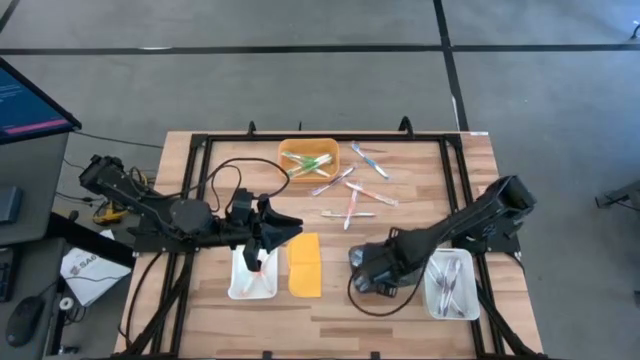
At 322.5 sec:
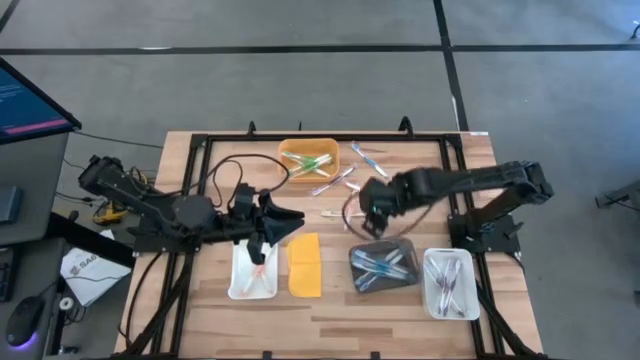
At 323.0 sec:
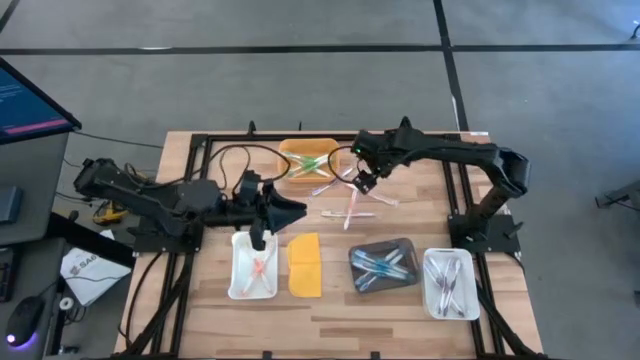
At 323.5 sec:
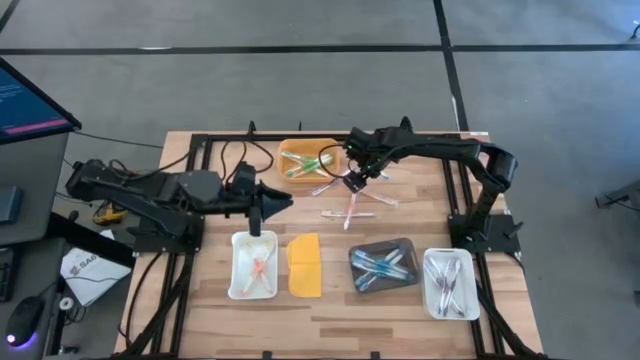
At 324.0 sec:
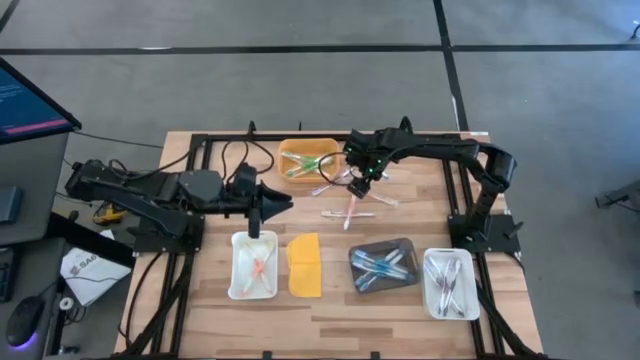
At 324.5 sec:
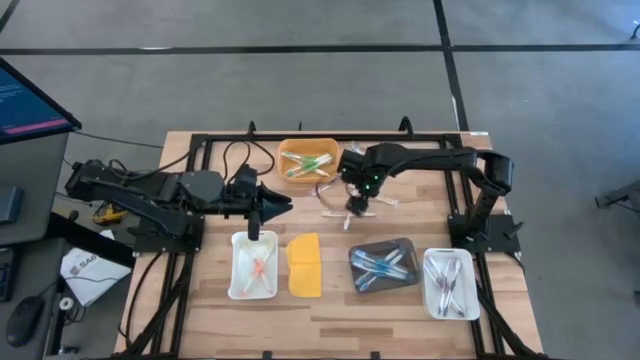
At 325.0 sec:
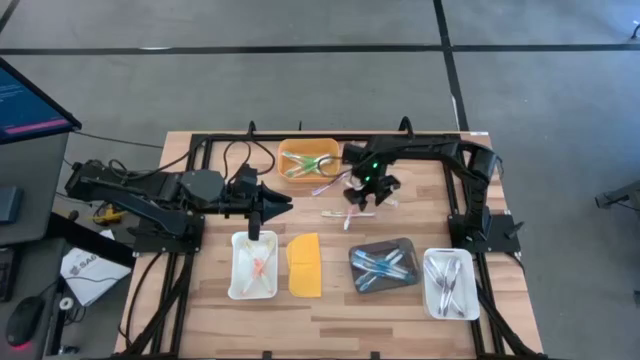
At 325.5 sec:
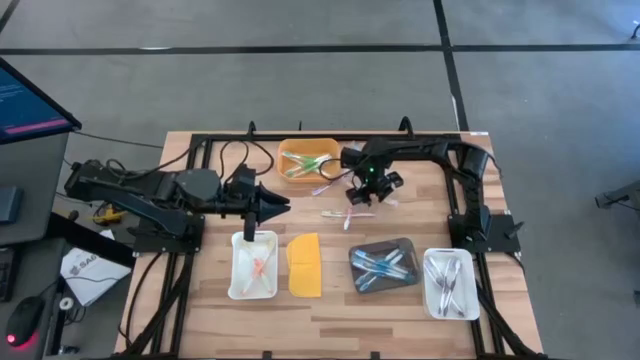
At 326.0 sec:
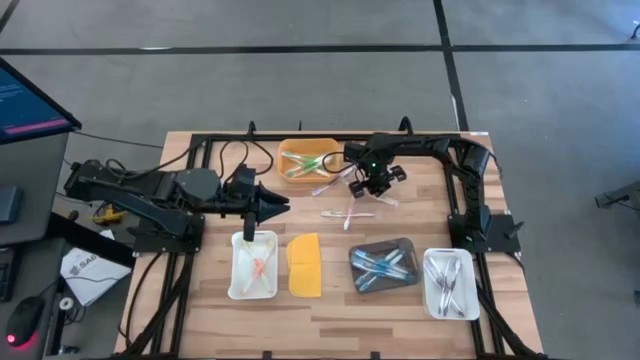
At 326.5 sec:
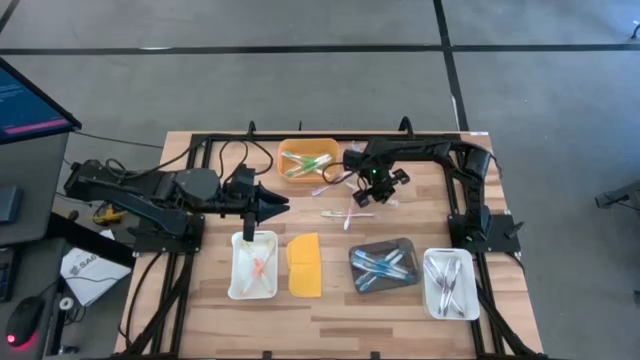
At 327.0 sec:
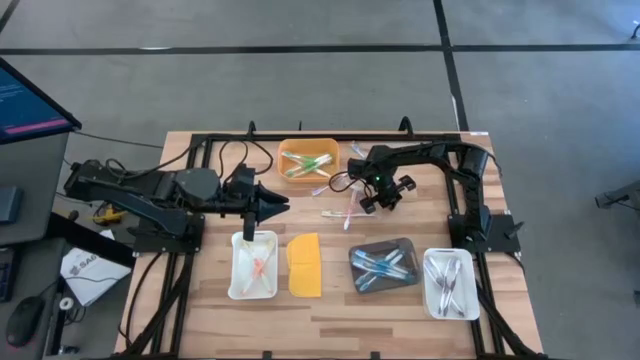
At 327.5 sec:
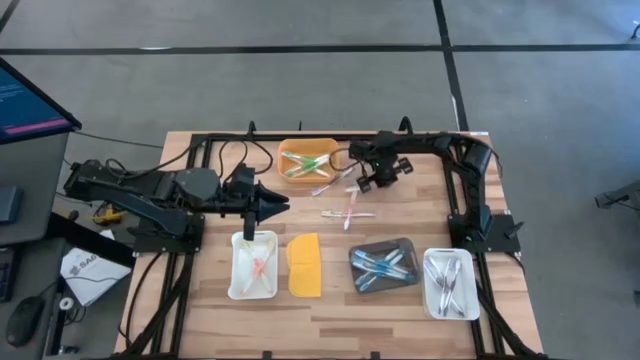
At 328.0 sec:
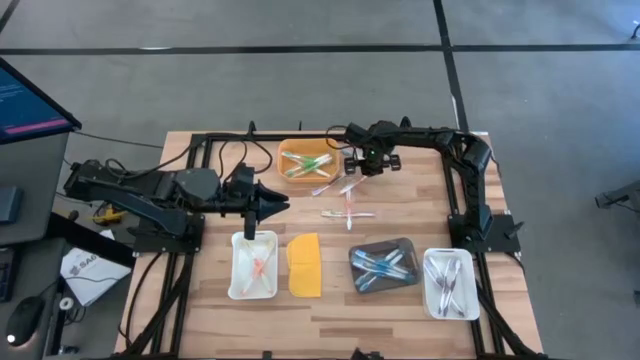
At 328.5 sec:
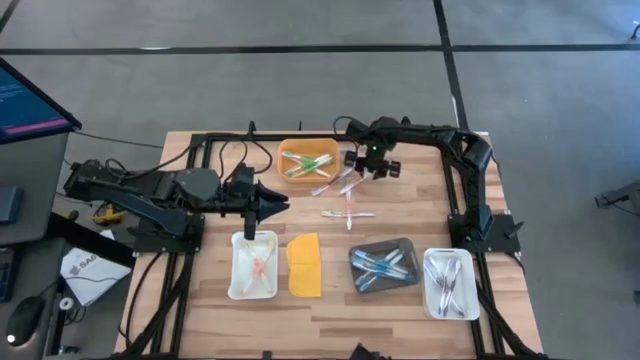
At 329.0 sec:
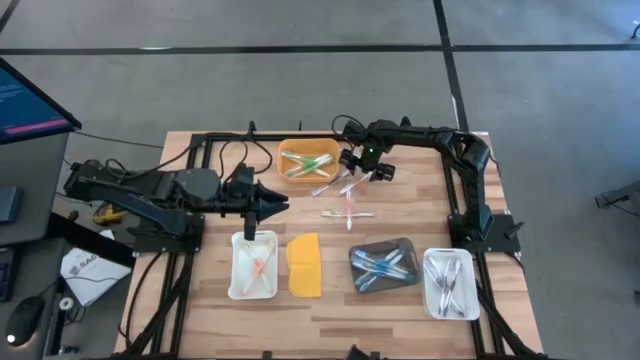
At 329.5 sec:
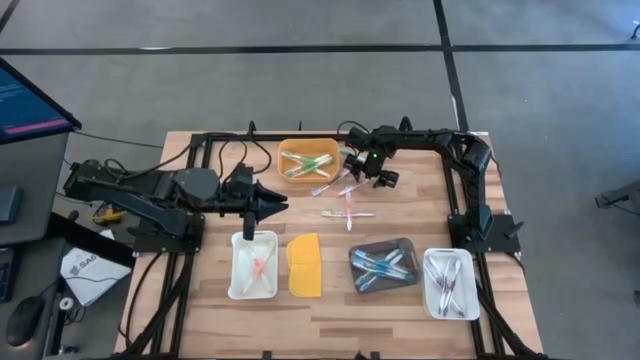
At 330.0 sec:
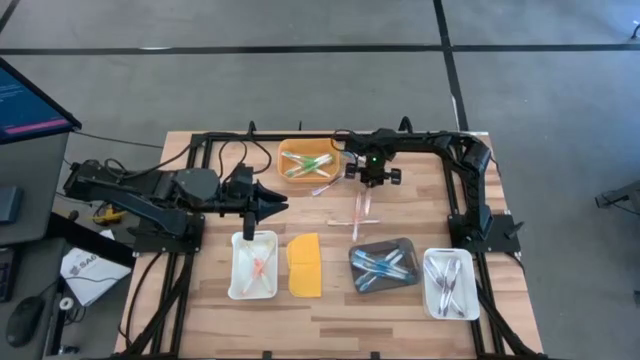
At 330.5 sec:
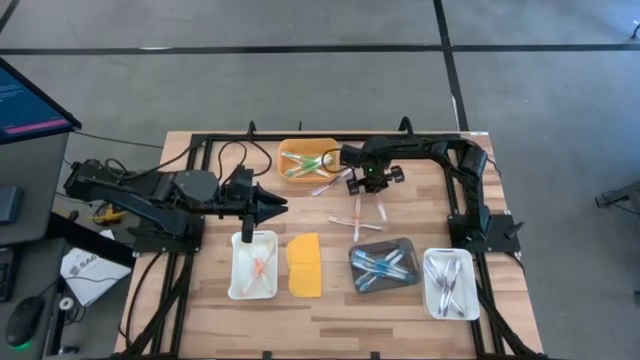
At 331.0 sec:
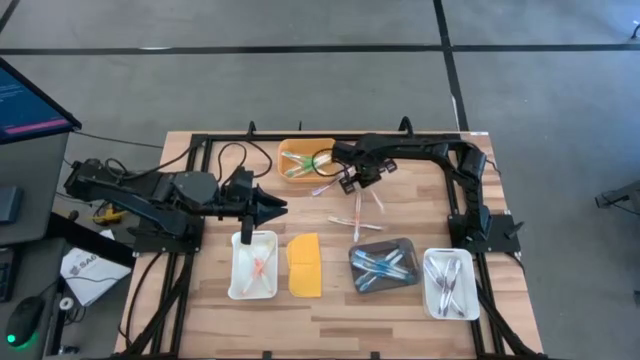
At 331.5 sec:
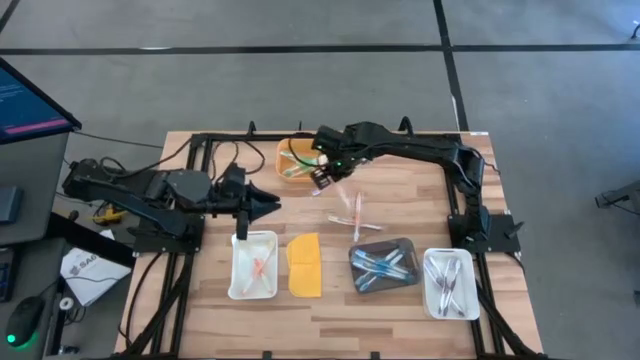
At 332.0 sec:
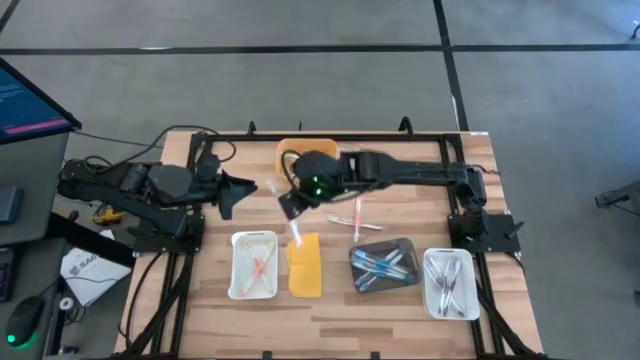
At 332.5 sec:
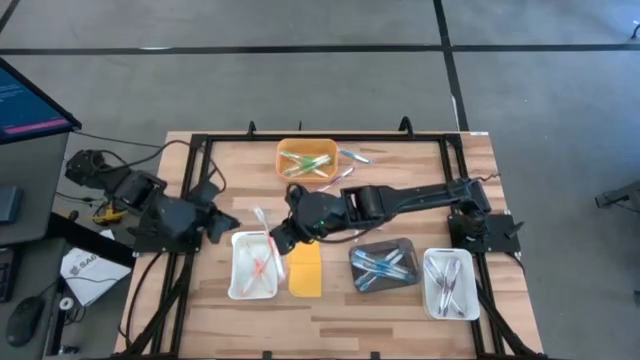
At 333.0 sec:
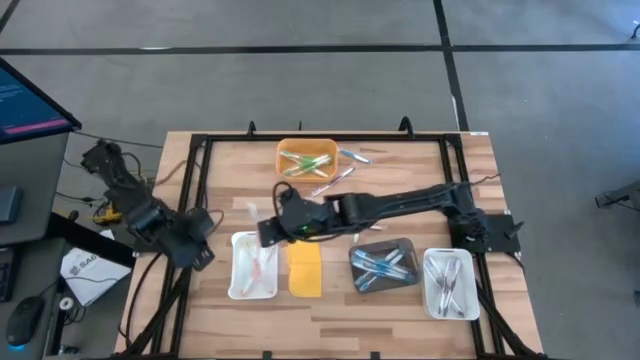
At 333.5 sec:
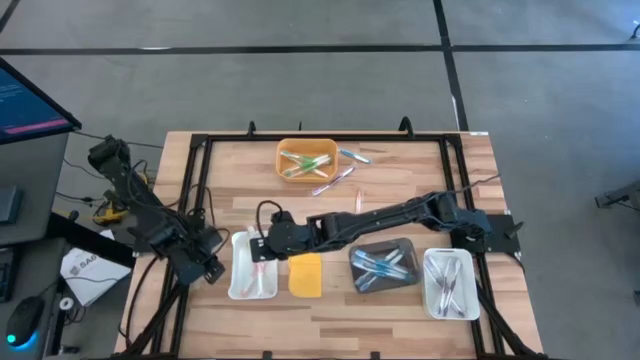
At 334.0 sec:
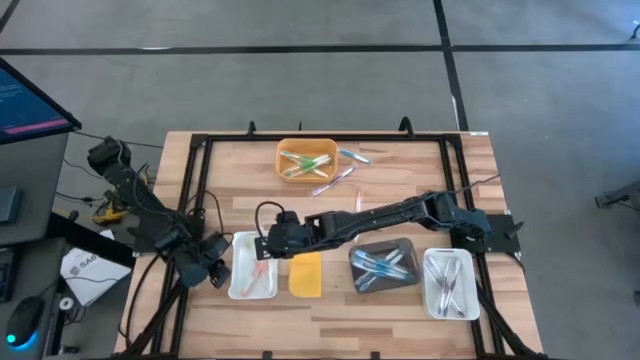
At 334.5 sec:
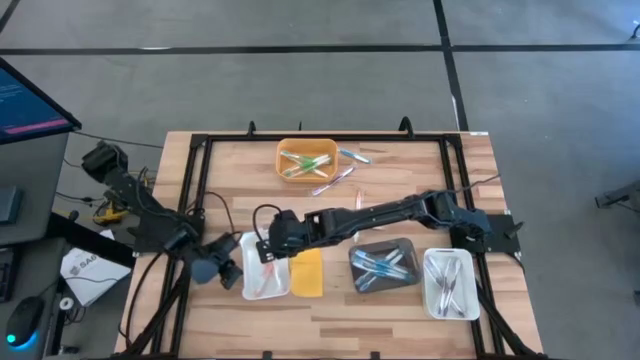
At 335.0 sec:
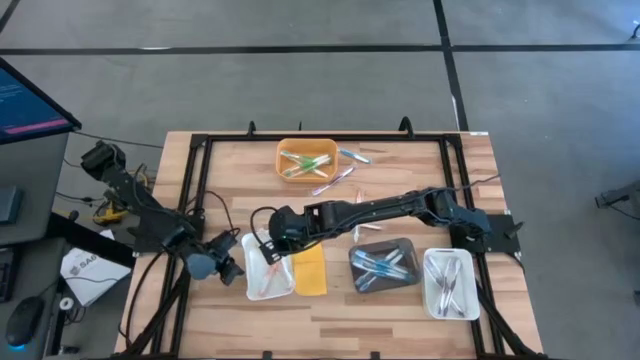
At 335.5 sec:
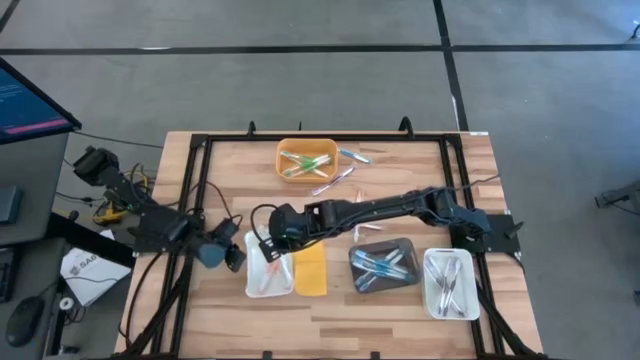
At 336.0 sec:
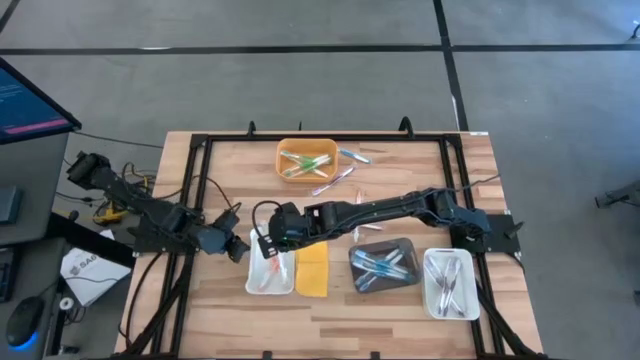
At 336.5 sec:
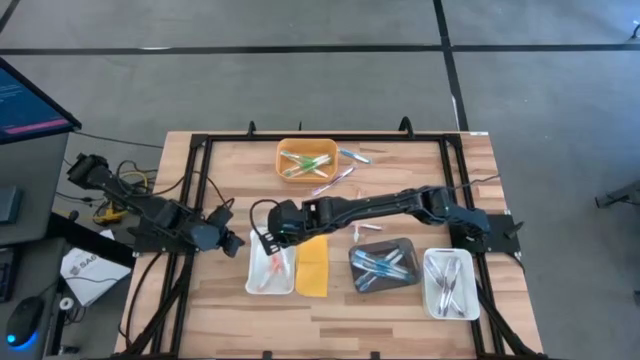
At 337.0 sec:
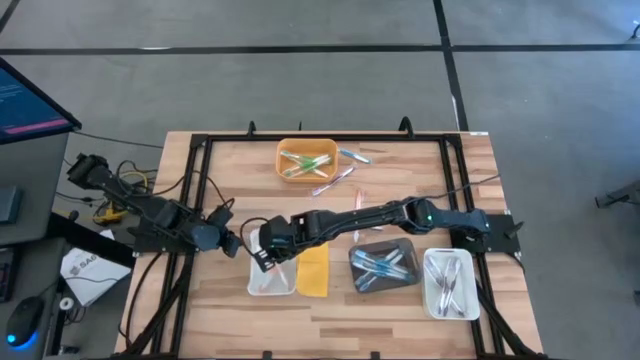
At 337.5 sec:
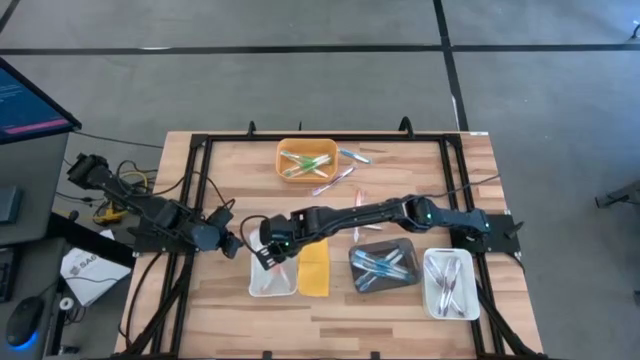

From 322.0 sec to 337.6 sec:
Task: Pick & Place Toothbrushes
Put the orange toothbrush into the left white bin

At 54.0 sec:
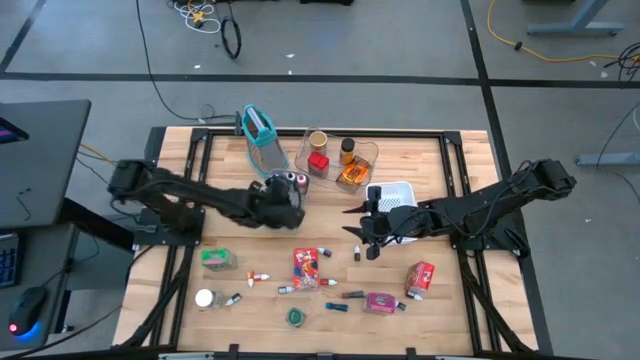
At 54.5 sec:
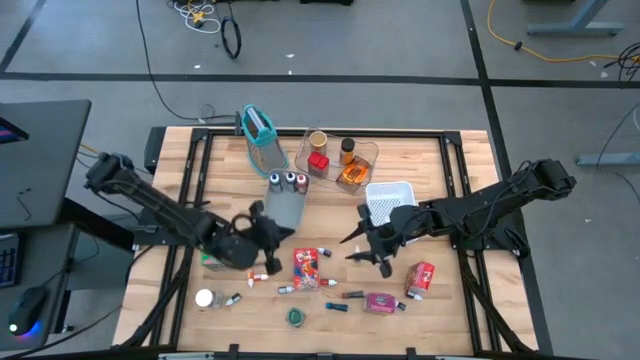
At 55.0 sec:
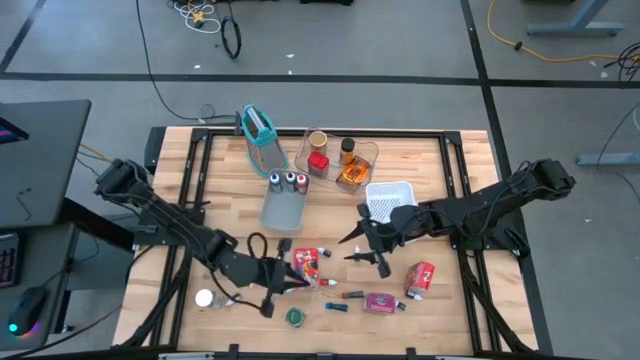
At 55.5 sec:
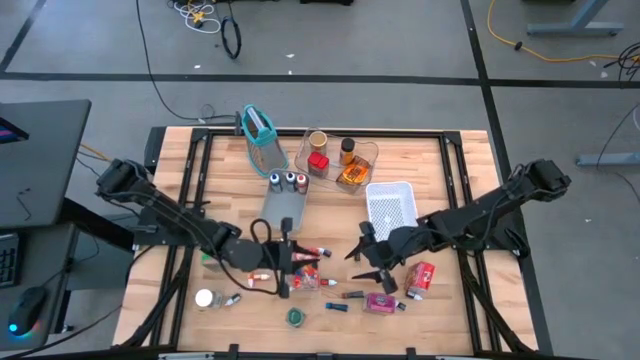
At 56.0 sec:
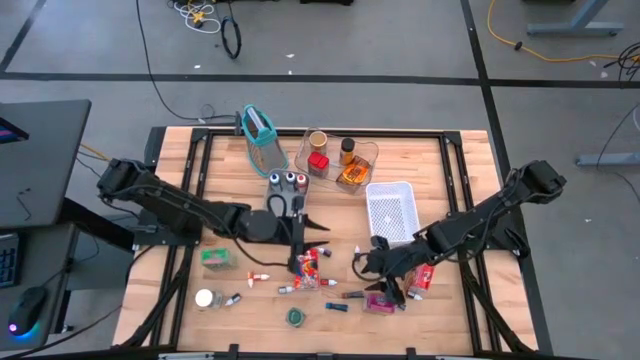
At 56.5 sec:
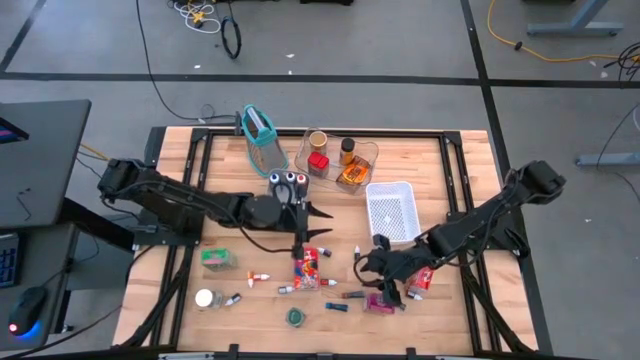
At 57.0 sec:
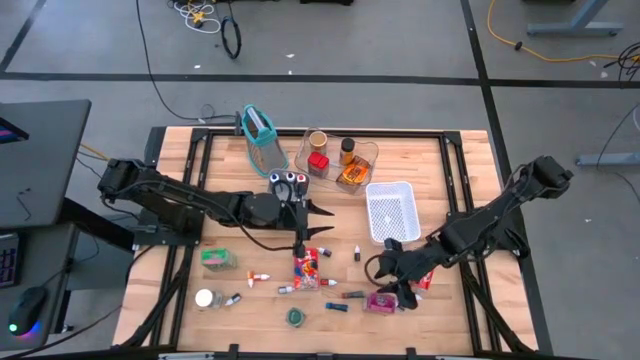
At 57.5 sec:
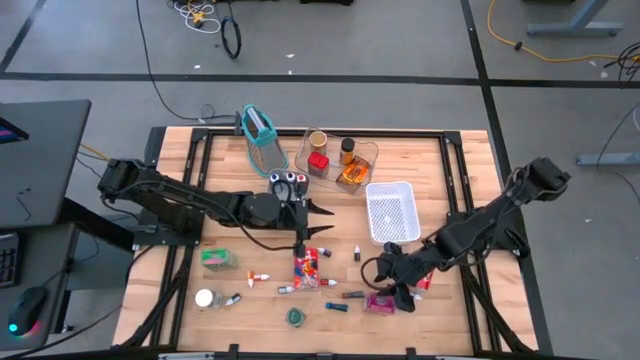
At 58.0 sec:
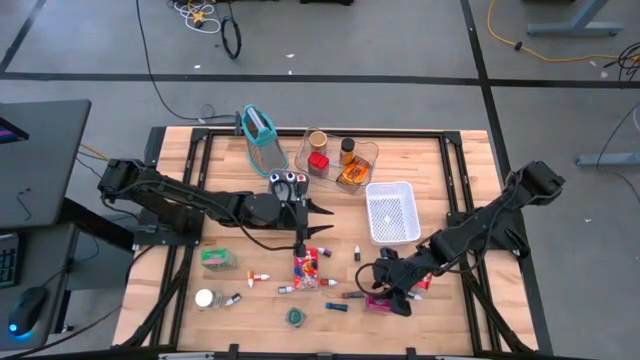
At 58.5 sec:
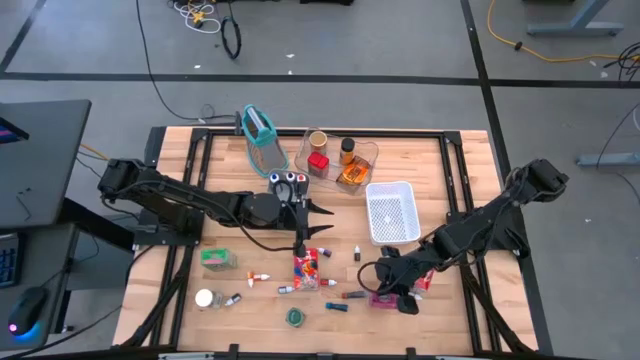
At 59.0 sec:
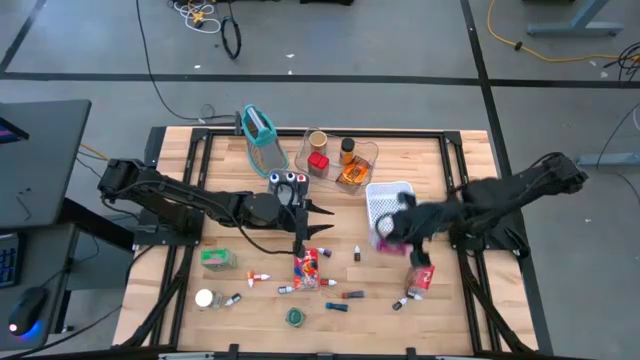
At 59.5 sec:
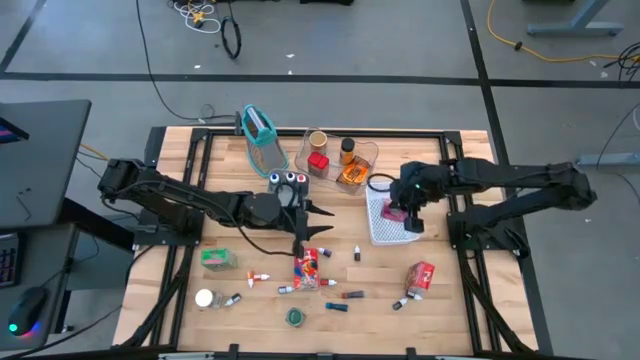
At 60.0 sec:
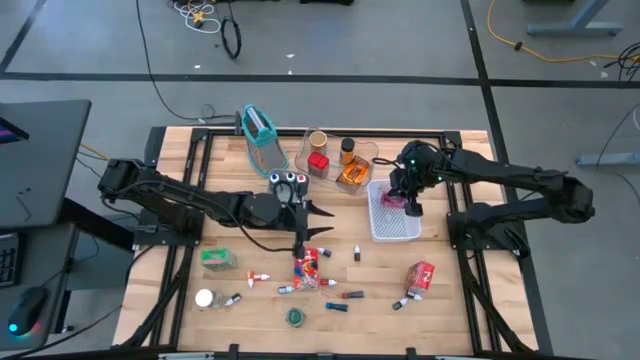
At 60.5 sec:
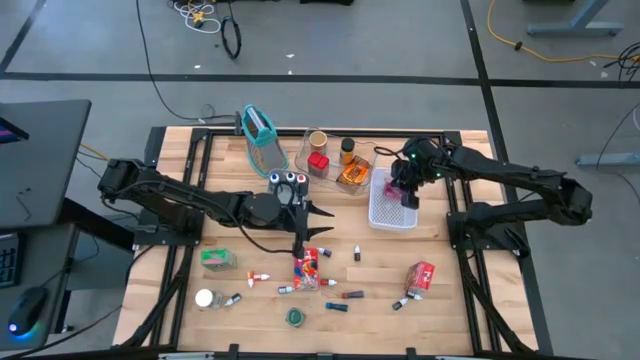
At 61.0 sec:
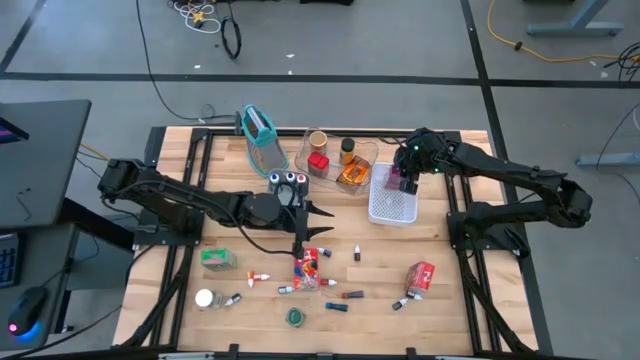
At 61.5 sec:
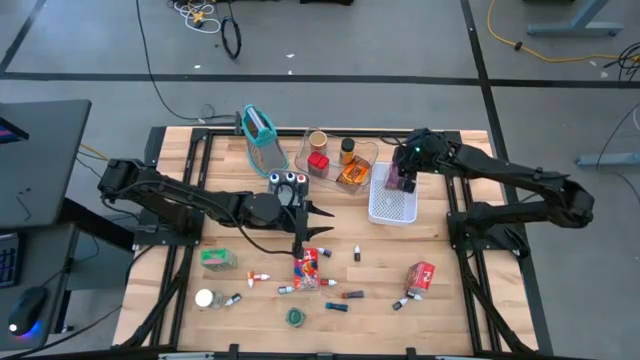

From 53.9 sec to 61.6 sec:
Task: Pick & Place Kitchen Items
Put the violet cereal box into the white bin
